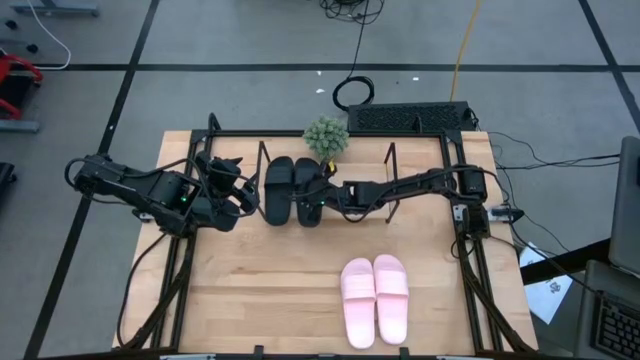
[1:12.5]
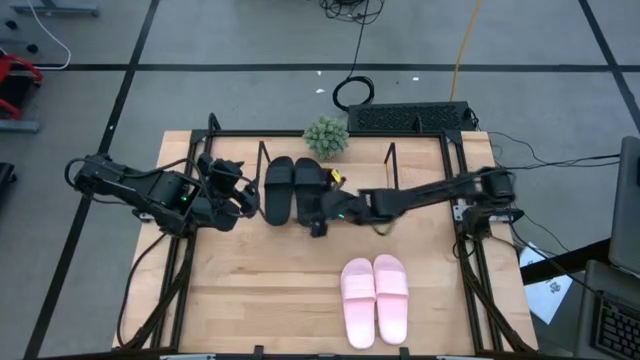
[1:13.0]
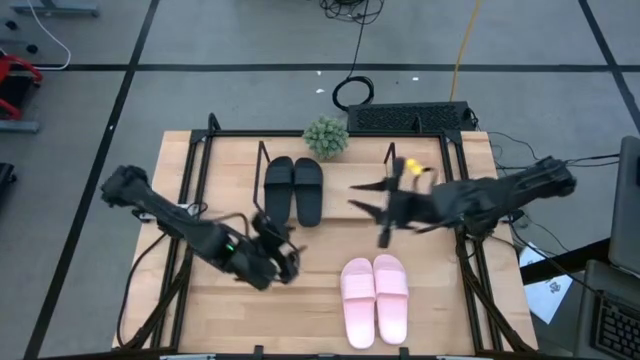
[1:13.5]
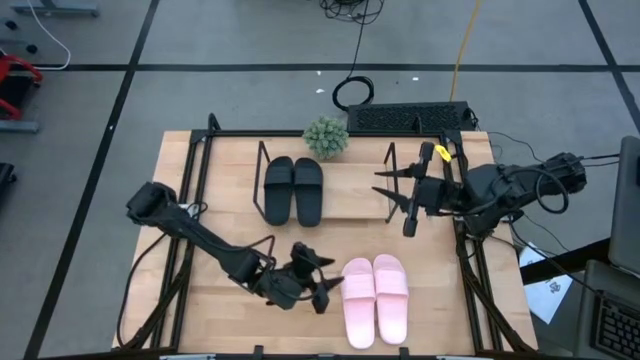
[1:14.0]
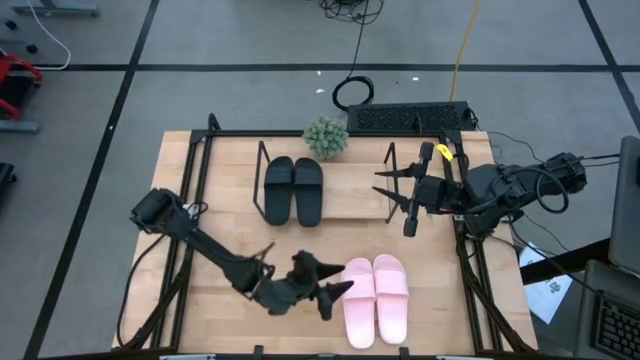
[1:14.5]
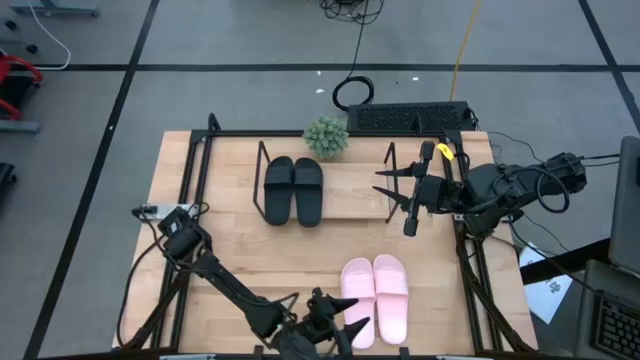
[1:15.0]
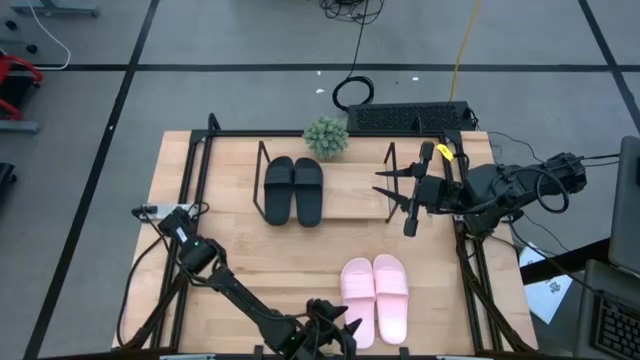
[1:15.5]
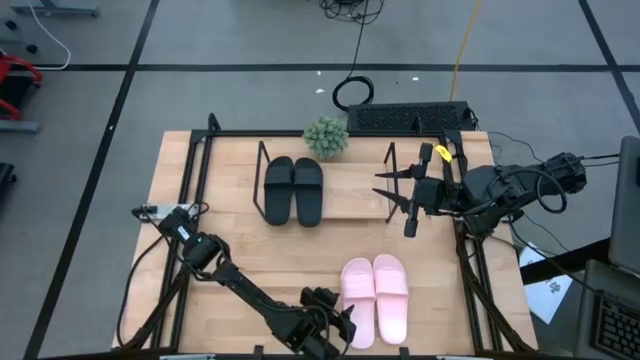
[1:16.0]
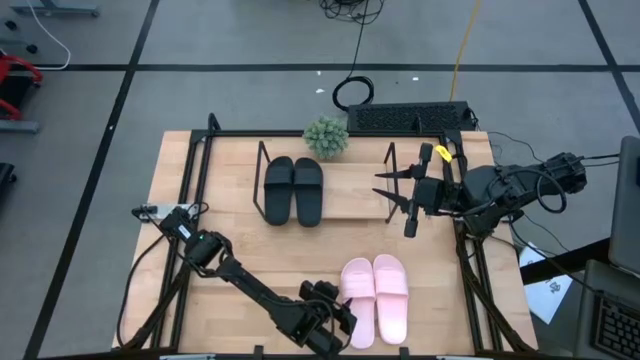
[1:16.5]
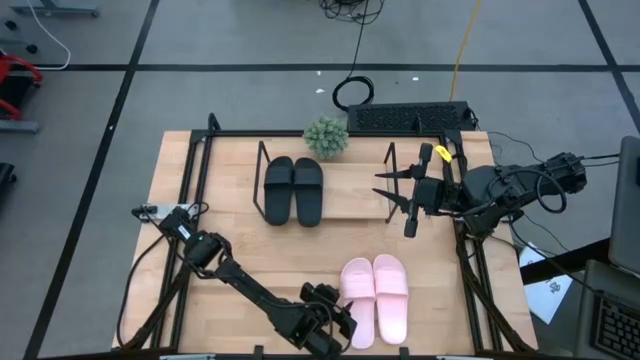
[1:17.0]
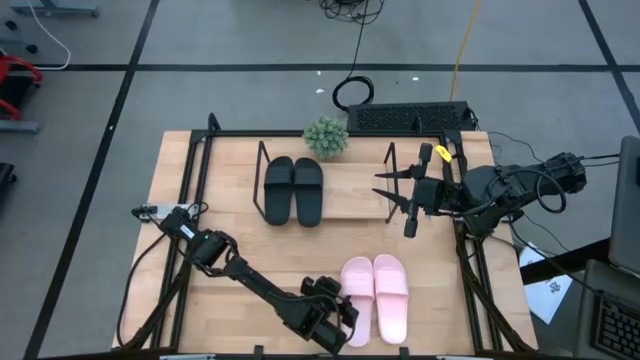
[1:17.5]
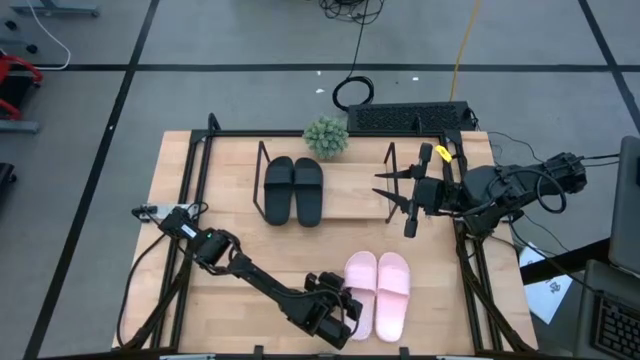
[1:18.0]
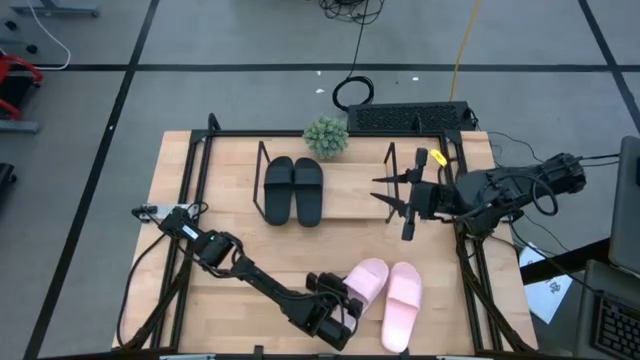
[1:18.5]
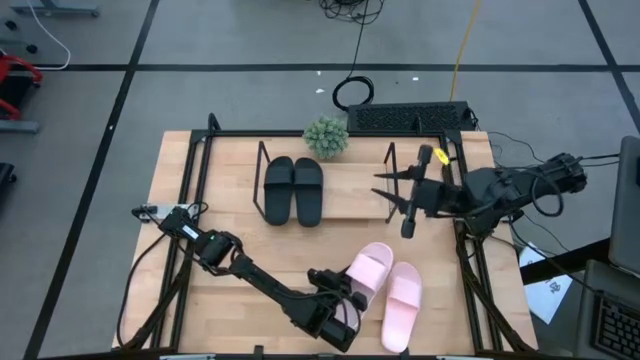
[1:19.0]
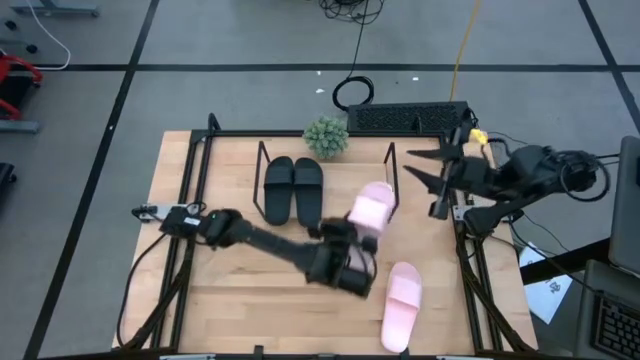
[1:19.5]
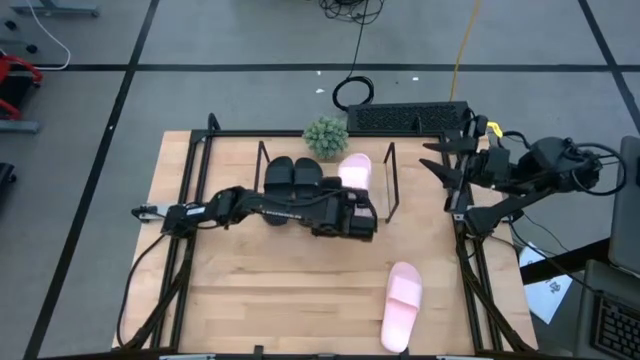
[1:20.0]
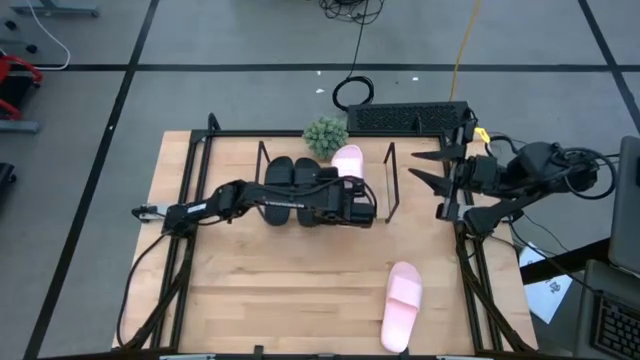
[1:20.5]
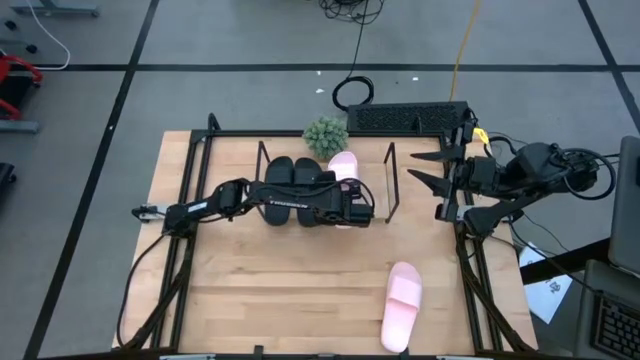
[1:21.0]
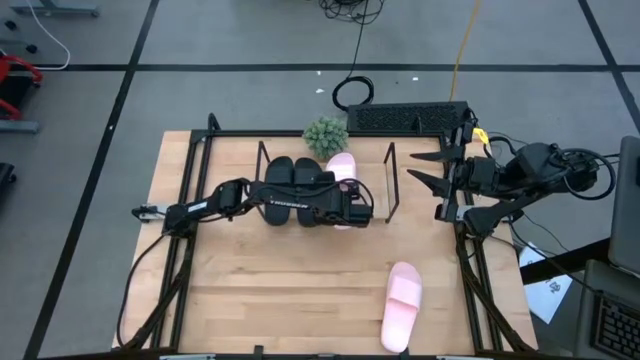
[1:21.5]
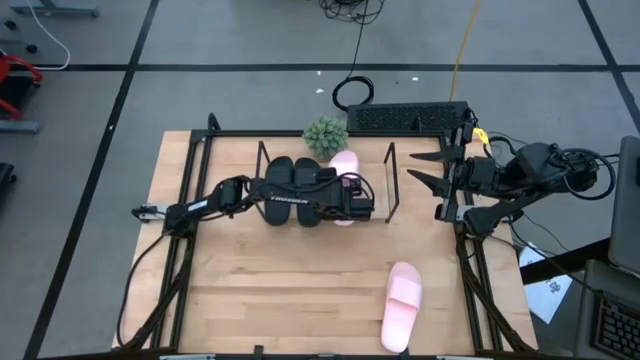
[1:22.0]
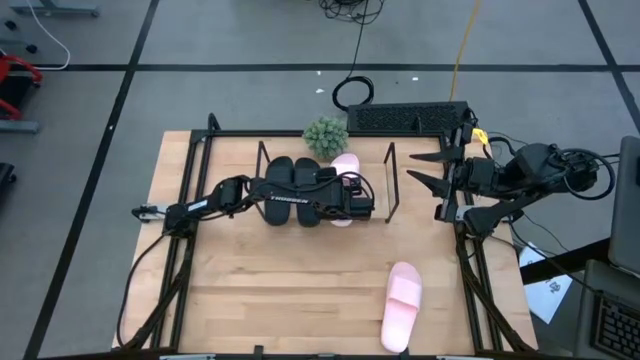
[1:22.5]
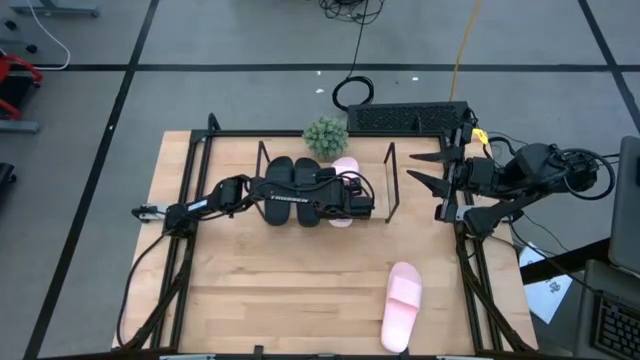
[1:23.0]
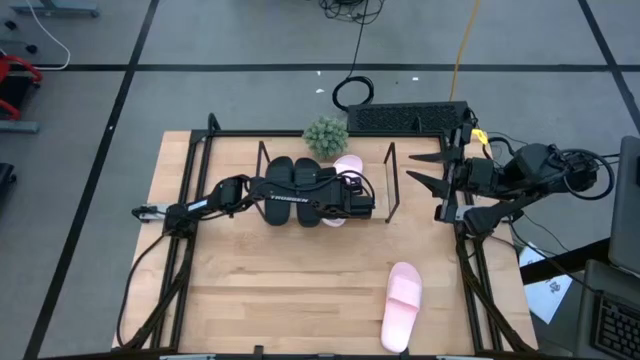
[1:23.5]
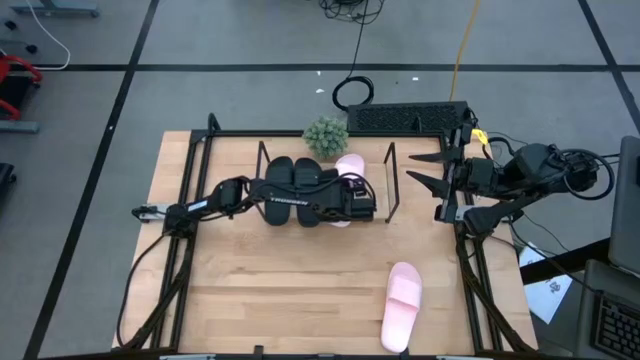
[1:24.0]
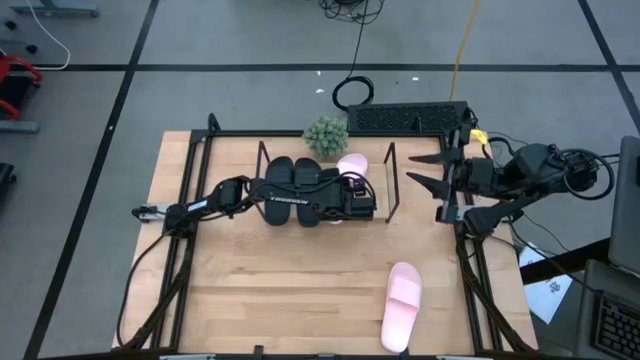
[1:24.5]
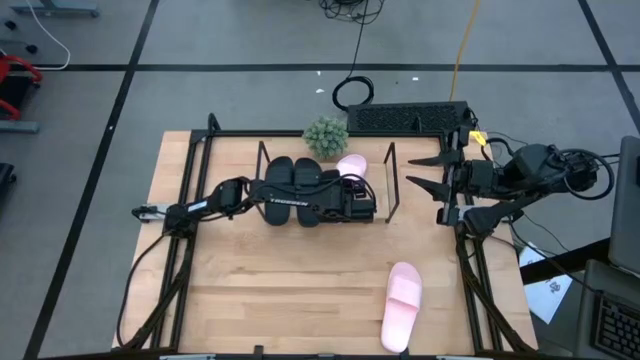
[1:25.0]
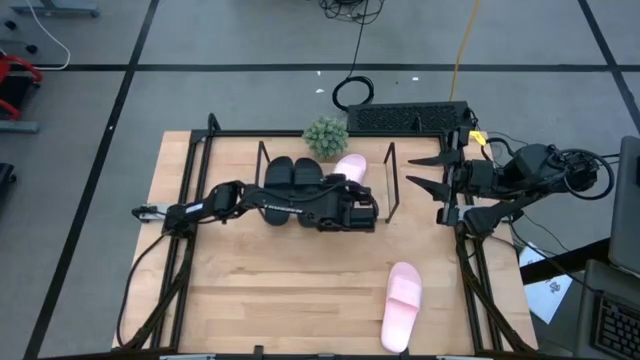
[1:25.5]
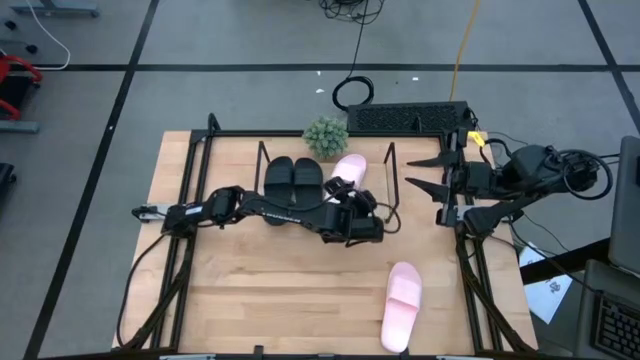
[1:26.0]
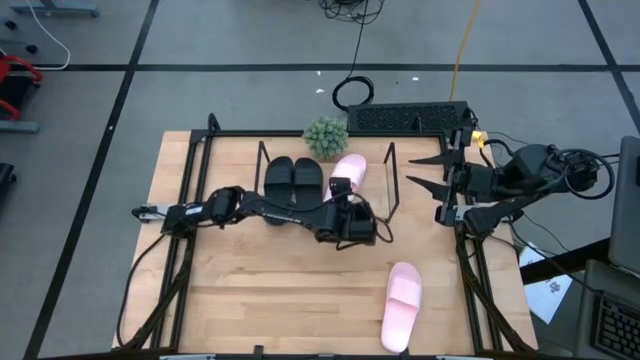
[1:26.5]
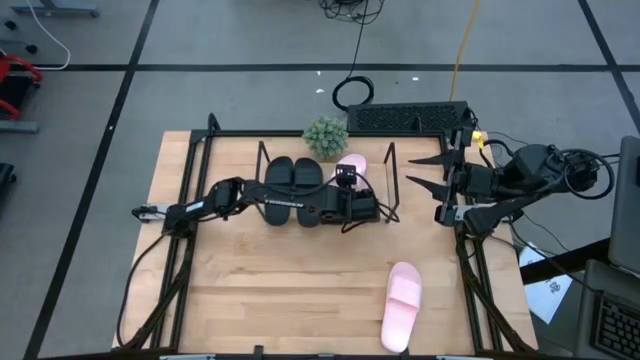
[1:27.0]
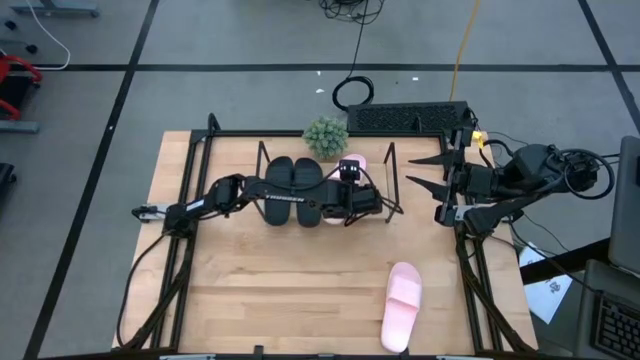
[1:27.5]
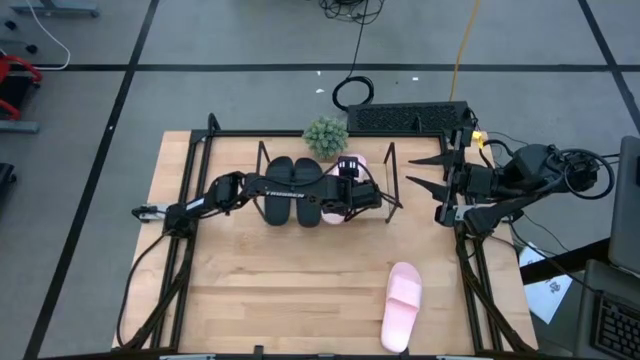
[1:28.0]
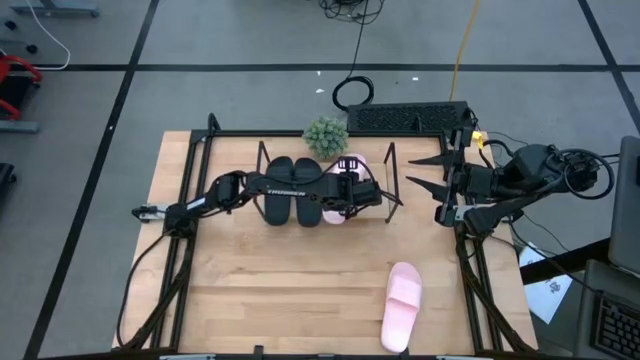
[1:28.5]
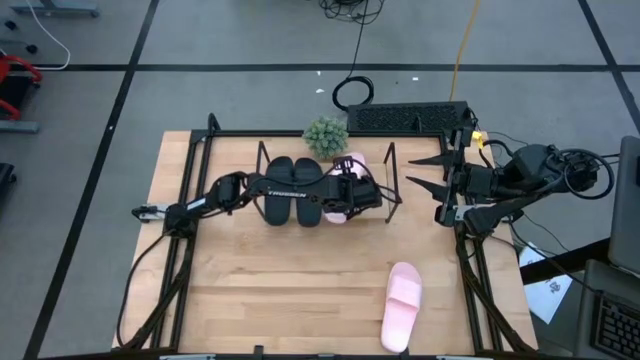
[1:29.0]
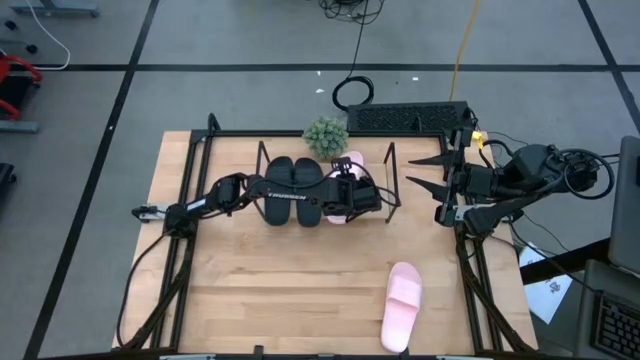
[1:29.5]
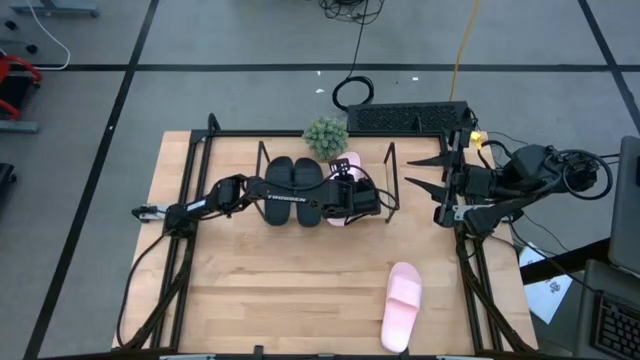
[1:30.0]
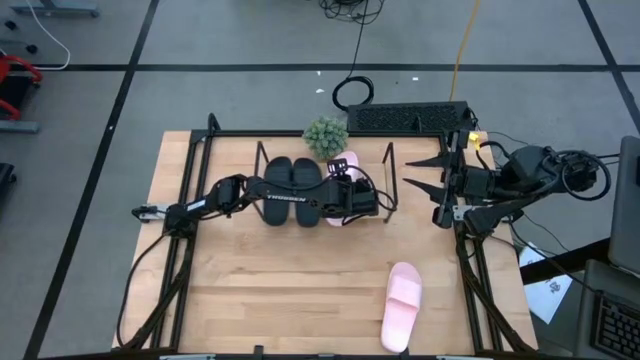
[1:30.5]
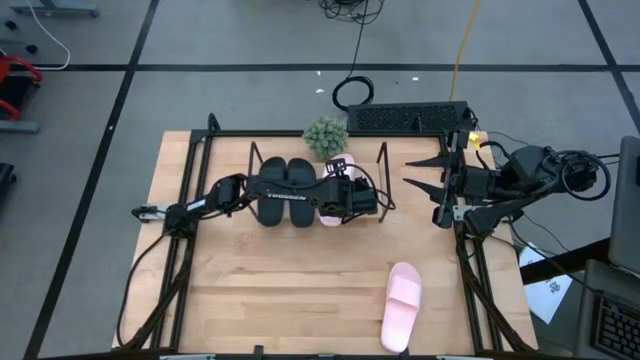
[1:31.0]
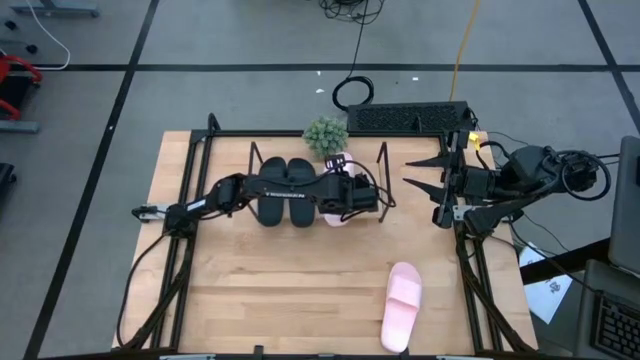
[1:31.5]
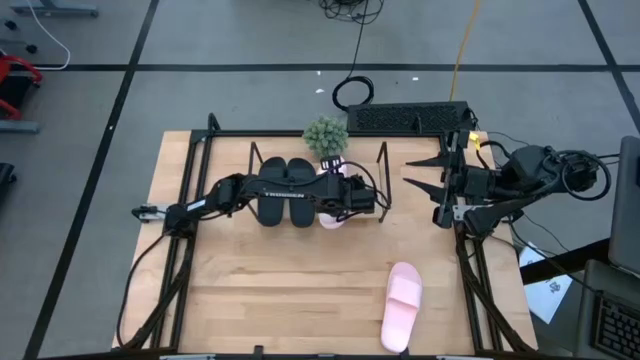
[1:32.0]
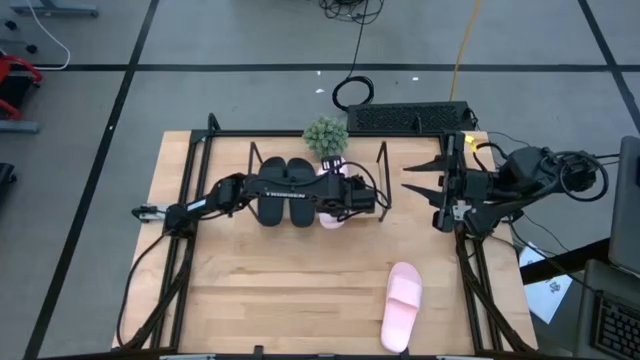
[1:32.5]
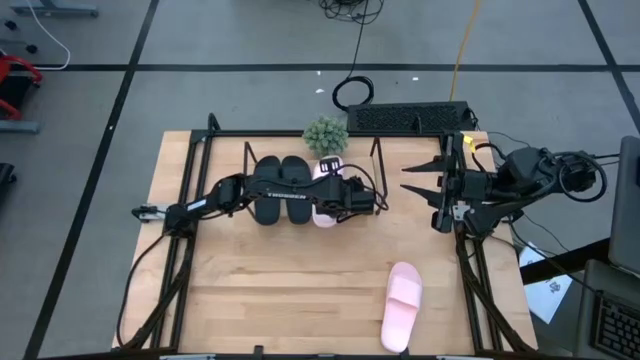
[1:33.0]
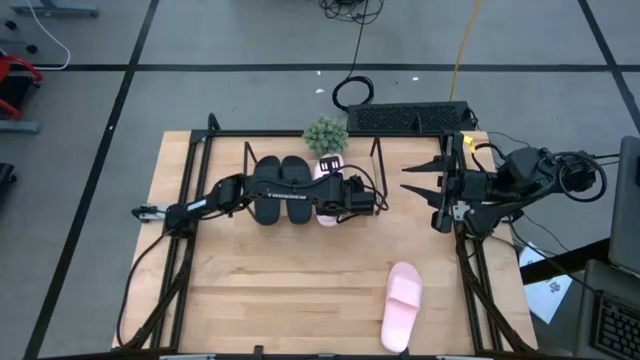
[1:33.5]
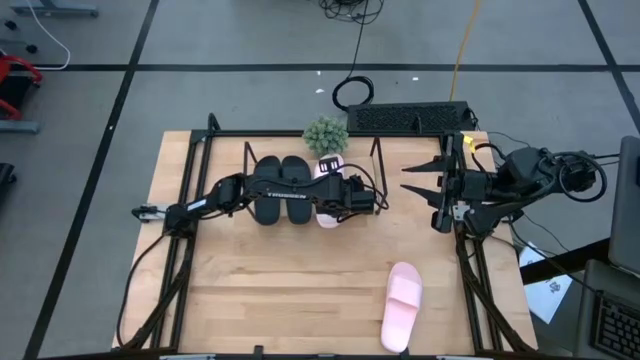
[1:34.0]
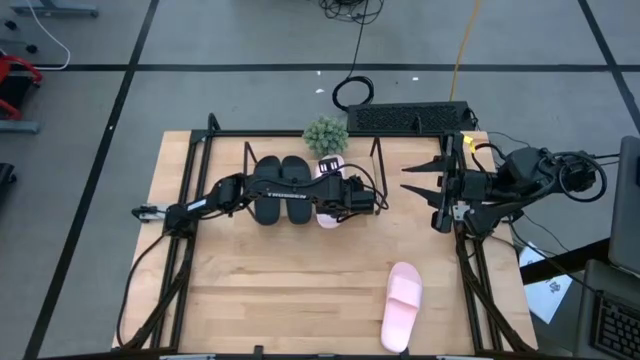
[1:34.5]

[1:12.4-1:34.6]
Task: Pick and place slides into the shelf
Put the left pink slides on the shelf
